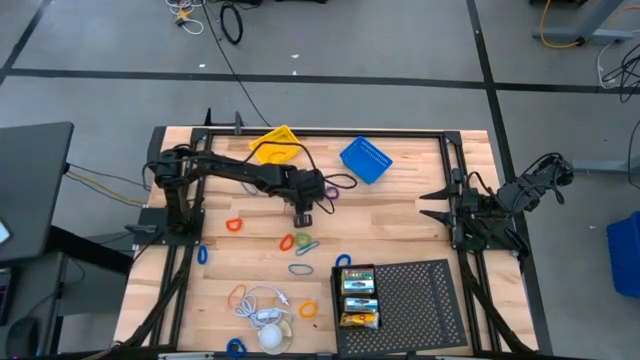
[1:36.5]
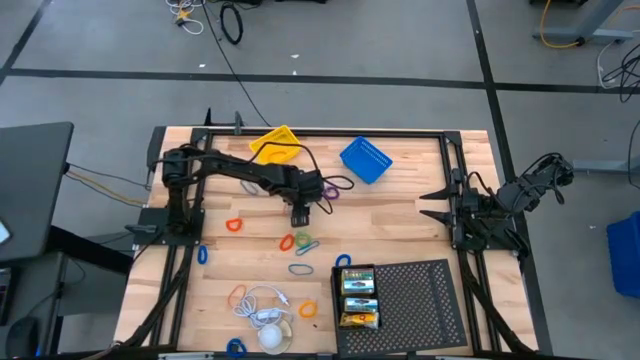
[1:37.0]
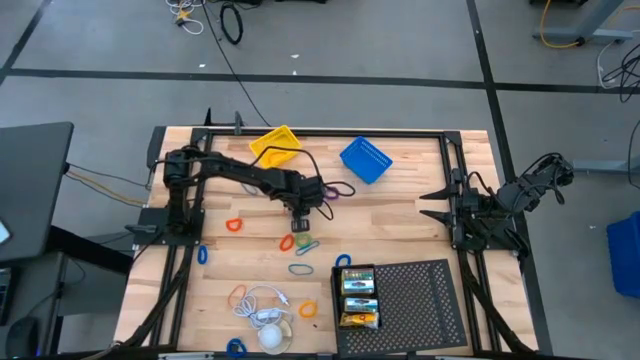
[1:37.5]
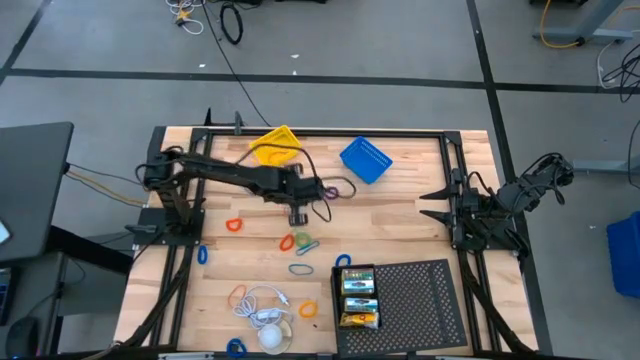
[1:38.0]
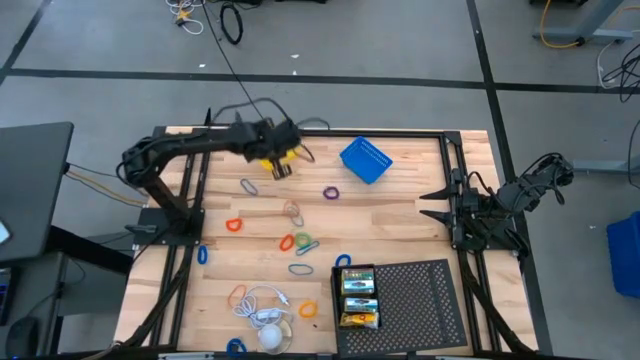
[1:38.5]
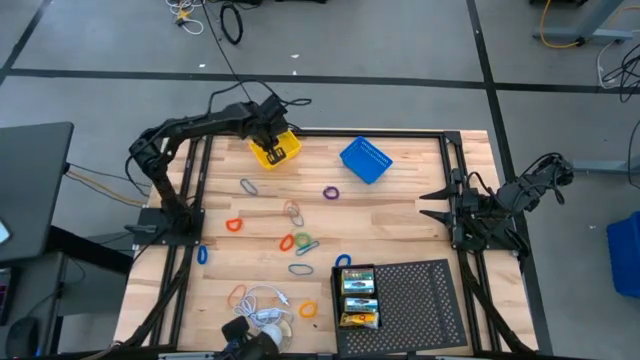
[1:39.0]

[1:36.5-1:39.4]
Task: Pick & Place Office Desk Supplies
Put the blue rubber band into the yellow basket

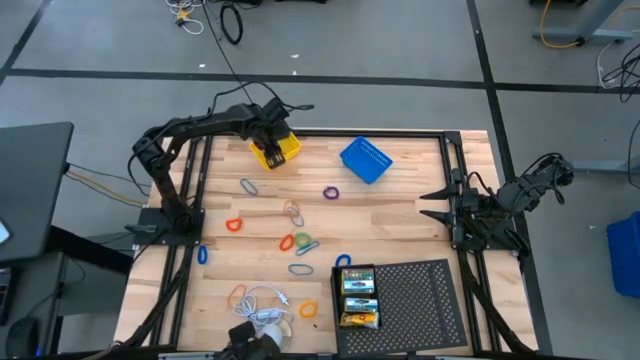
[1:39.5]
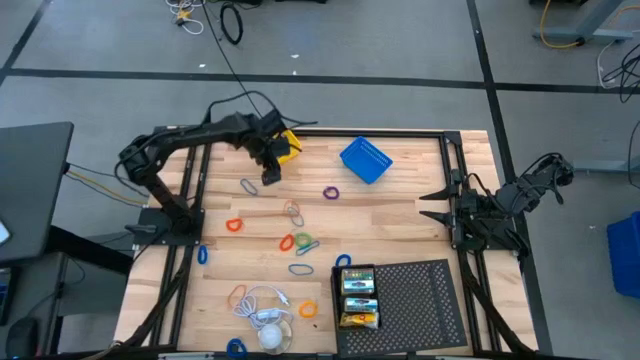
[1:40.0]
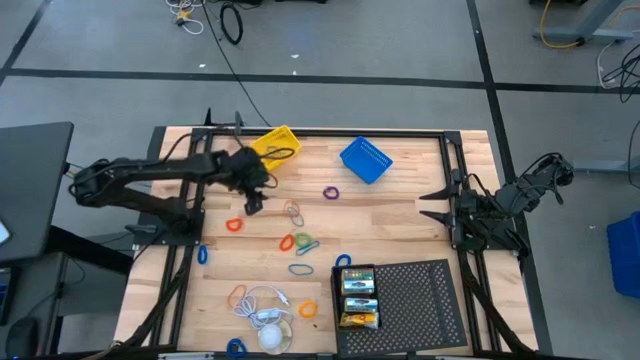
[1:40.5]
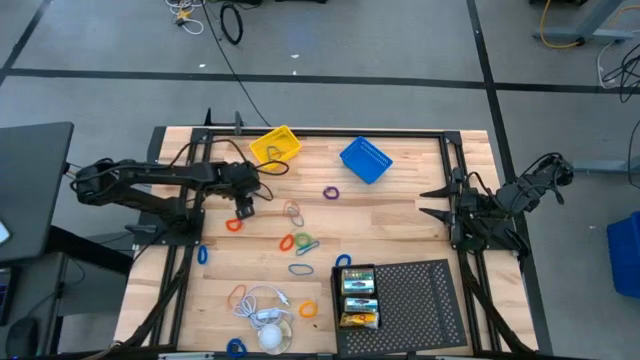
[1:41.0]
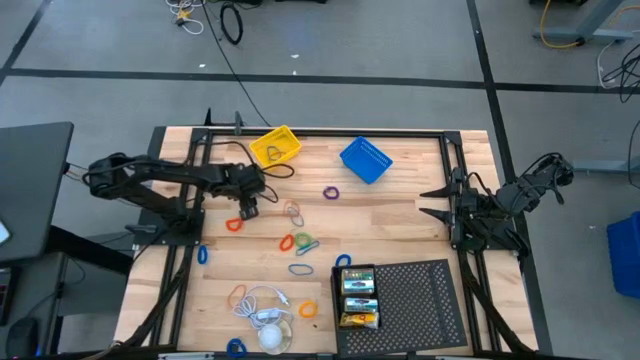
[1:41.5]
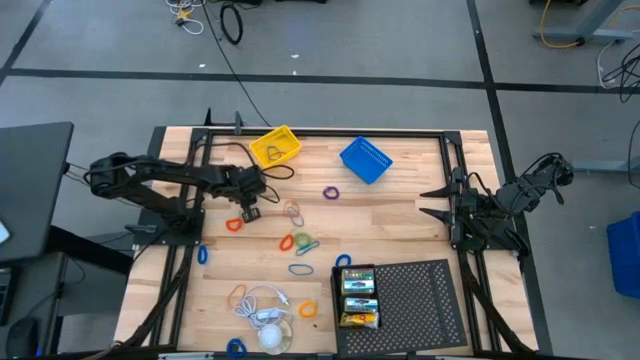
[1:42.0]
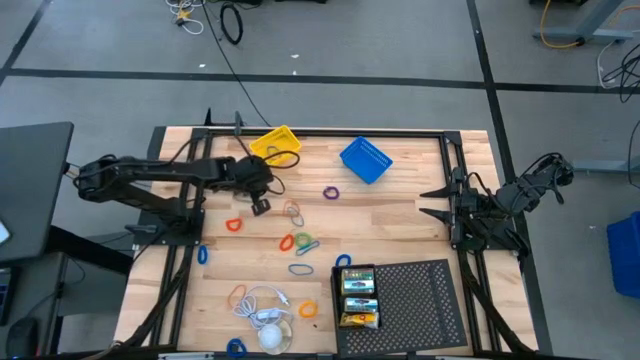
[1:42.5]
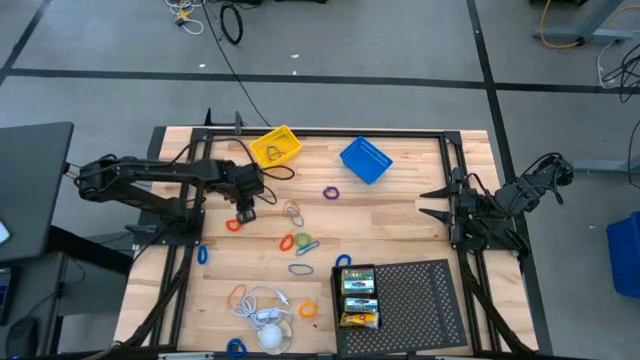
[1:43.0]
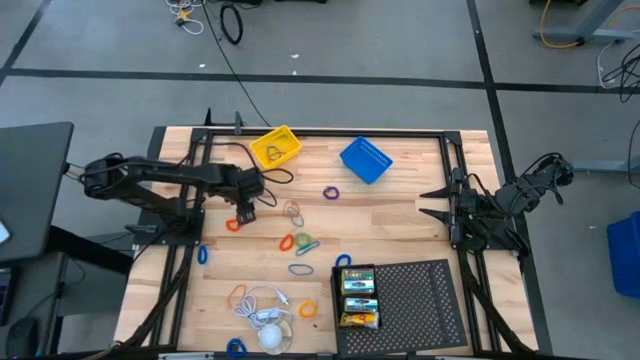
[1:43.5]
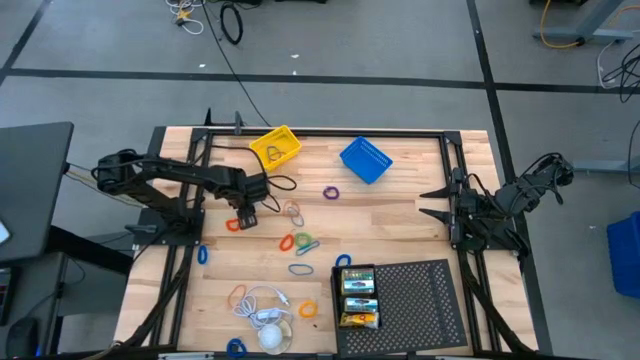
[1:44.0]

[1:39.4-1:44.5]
Put the blue rubber band into the yellow basket

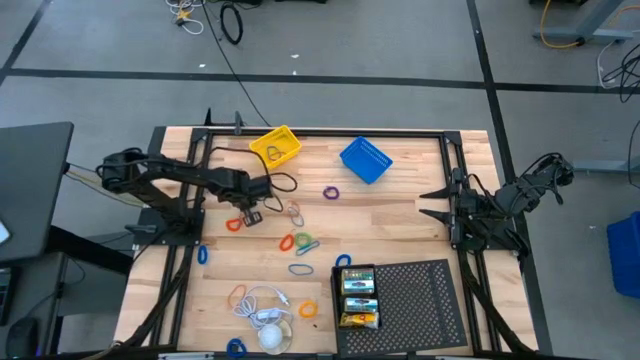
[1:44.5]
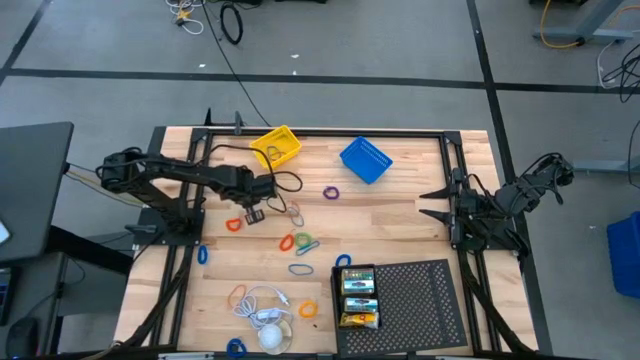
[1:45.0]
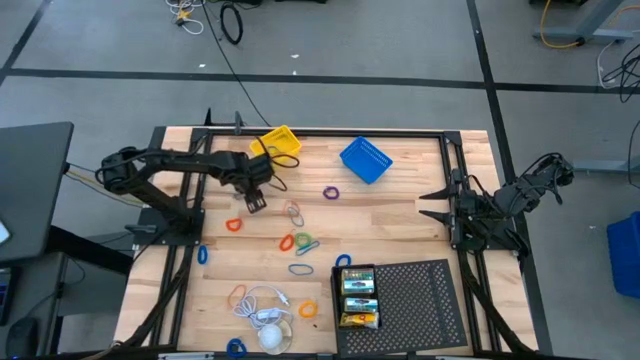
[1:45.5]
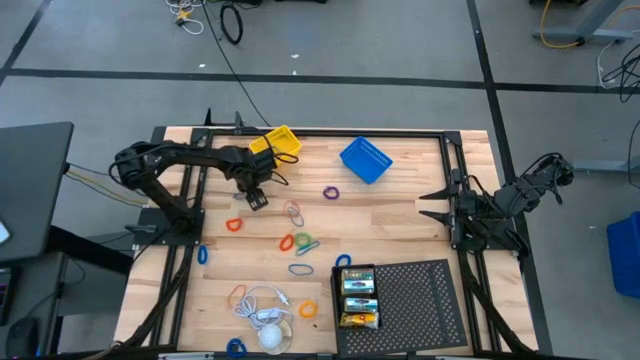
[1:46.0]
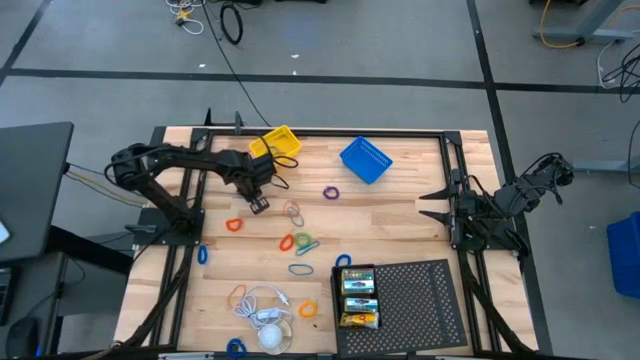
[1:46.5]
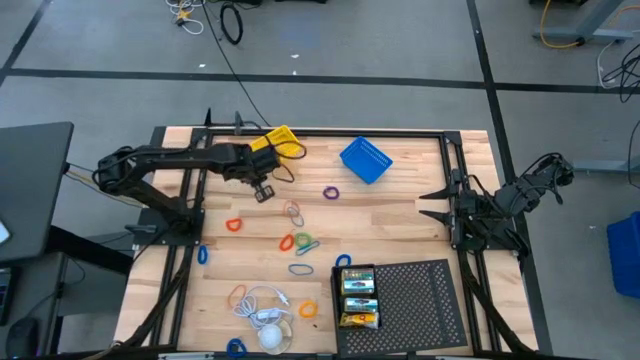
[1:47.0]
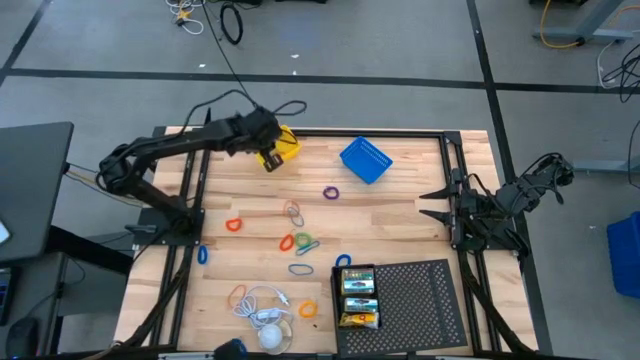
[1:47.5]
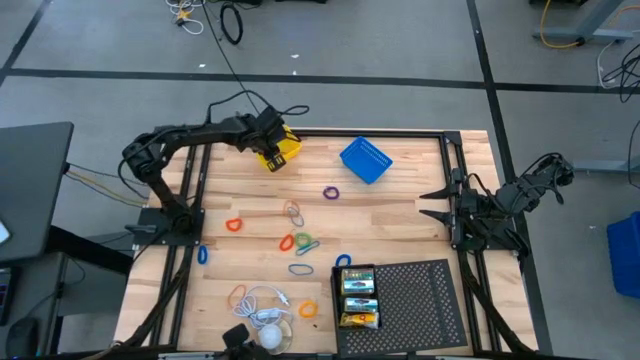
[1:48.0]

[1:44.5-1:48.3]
Put the blue rubber band into the yellow basket

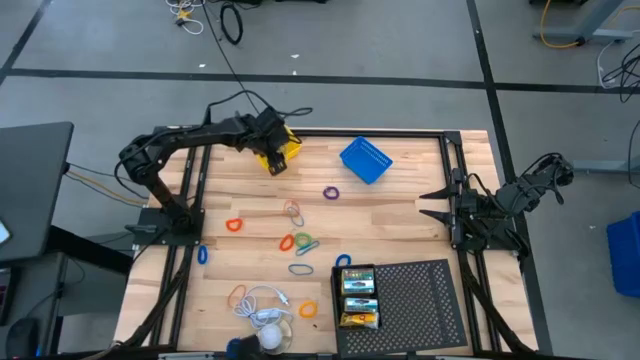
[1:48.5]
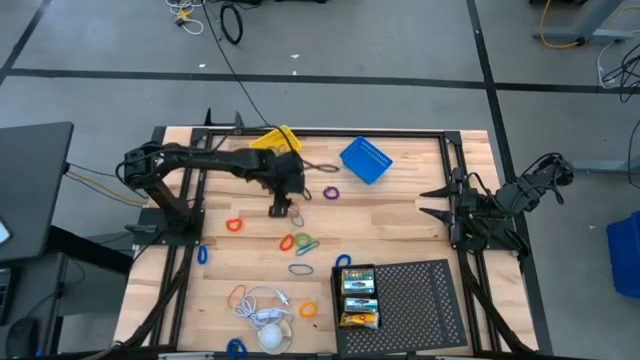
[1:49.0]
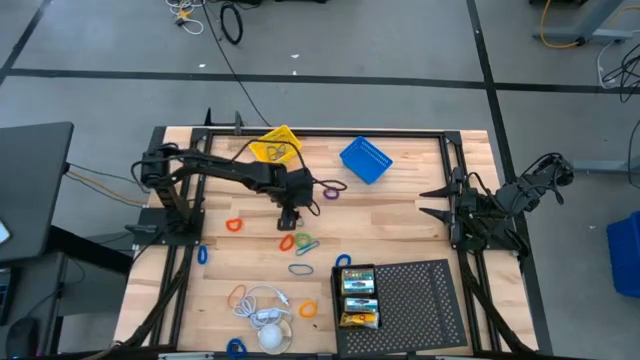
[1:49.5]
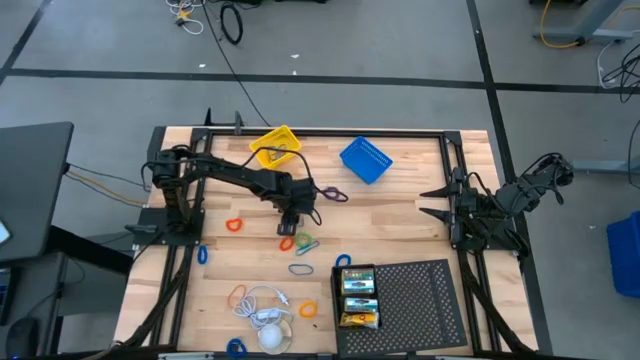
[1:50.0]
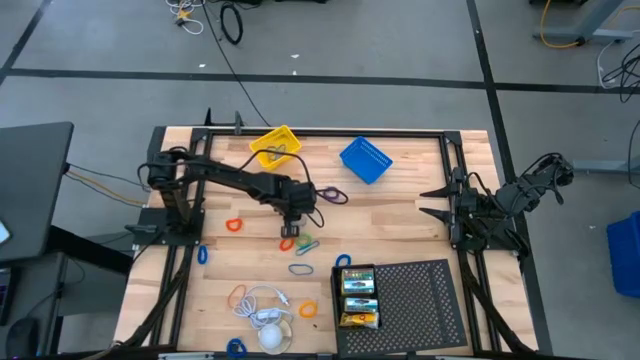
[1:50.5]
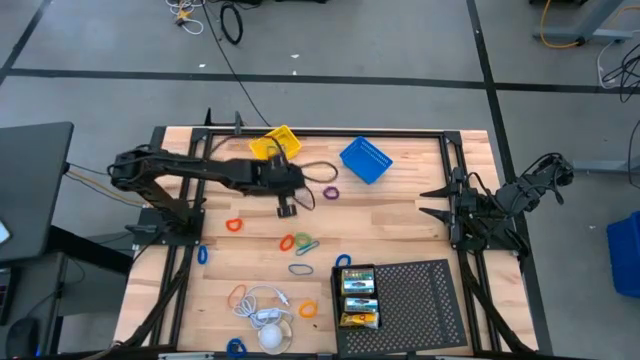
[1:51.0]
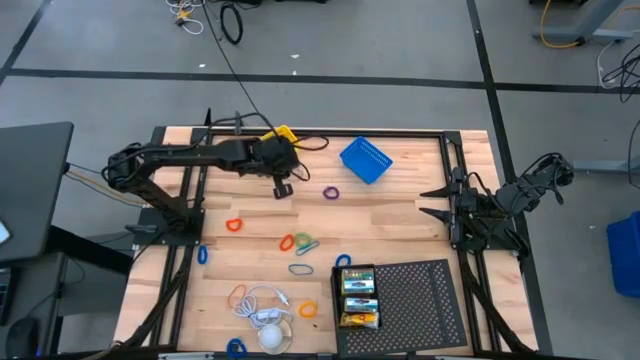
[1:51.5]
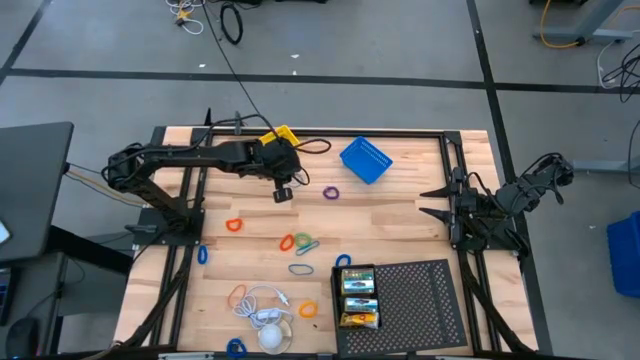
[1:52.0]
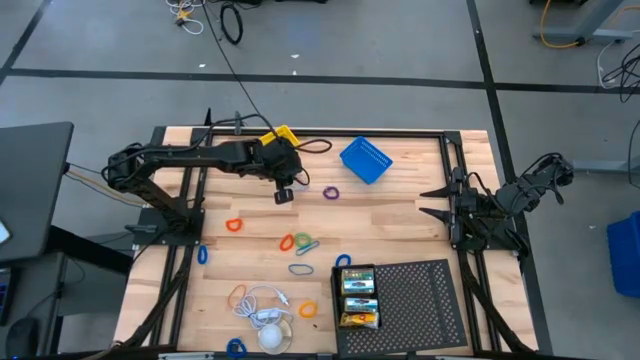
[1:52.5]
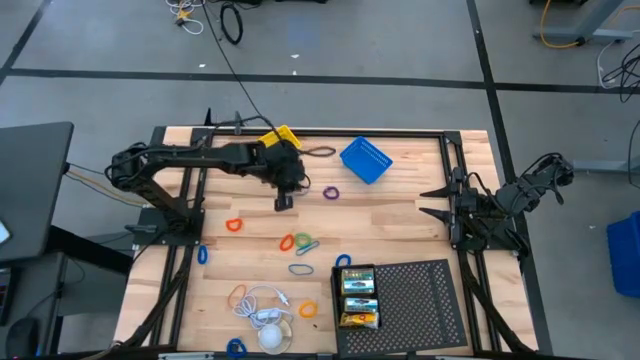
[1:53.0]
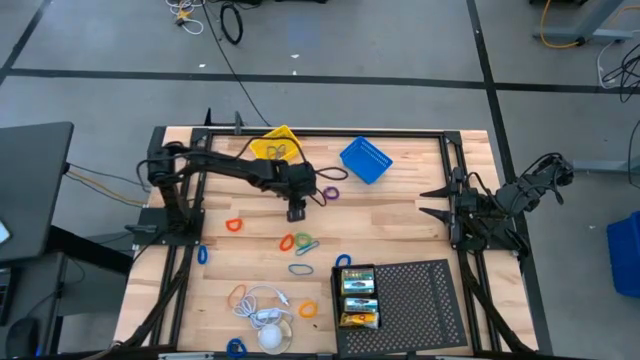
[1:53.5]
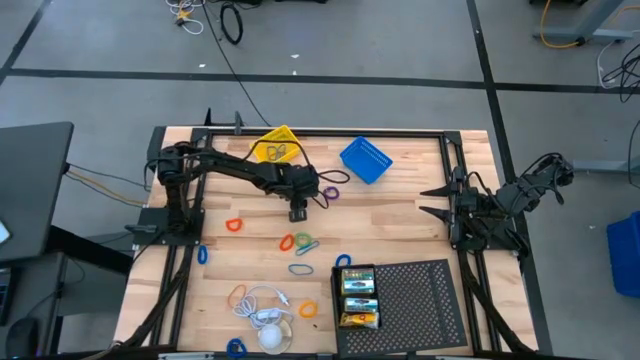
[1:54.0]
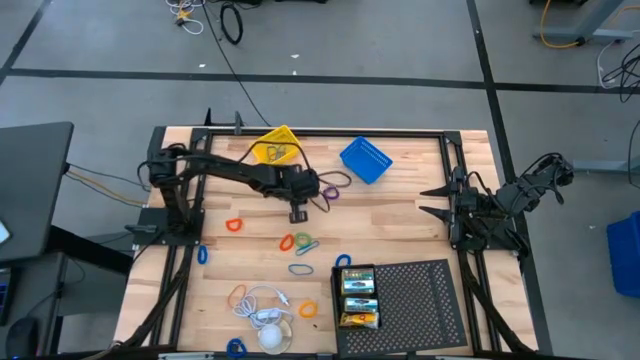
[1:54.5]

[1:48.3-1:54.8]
Put the blue rubber band into the yellow basket

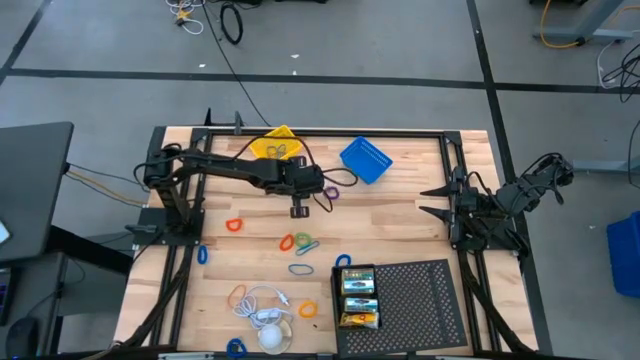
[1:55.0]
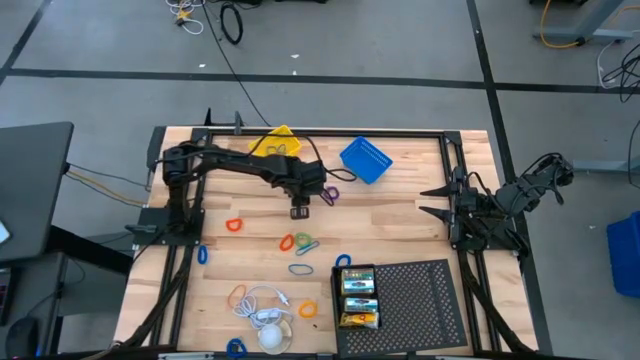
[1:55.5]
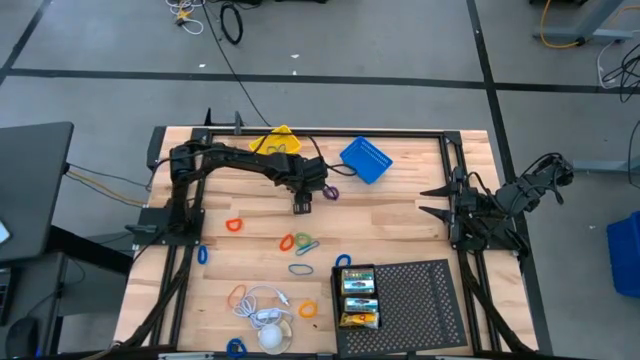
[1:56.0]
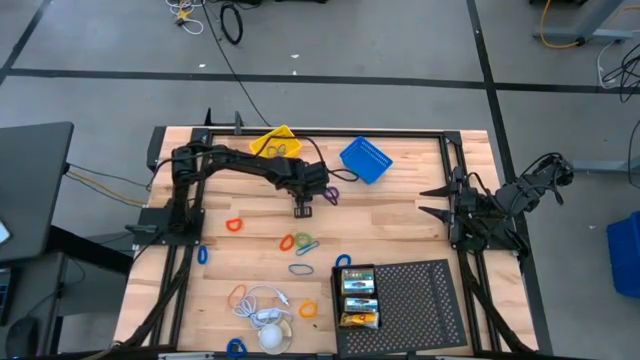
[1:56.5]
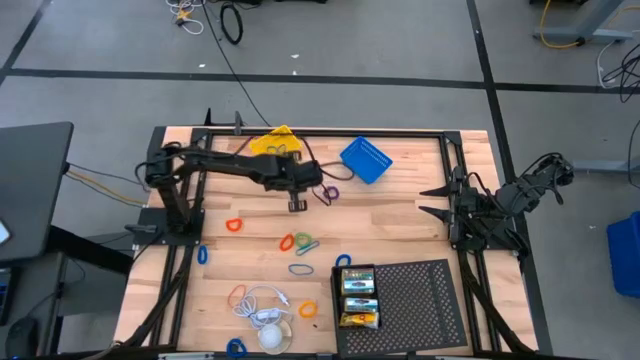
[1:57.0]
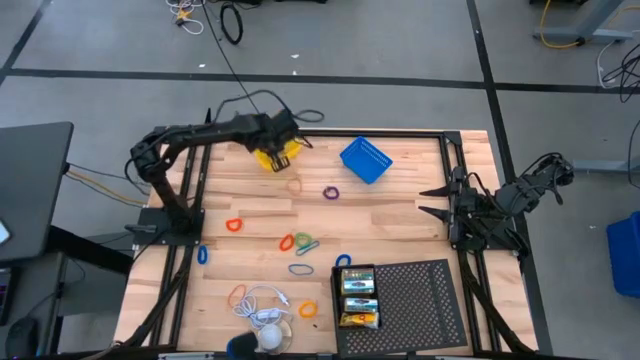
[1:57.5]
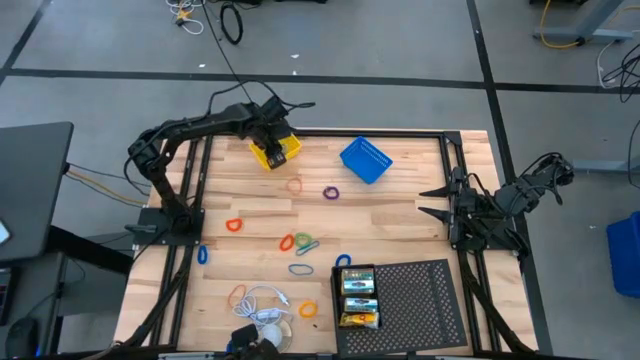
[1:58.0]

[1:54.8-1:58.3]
Put the blue rubber band into the yellow basket
